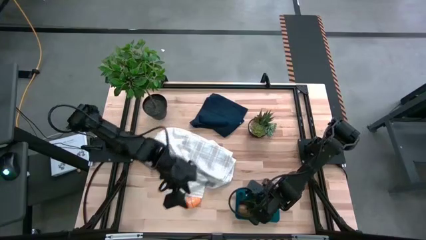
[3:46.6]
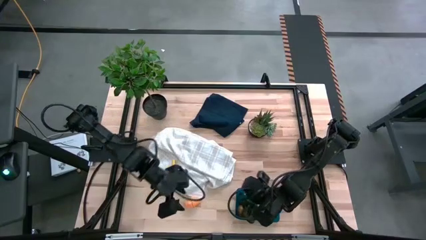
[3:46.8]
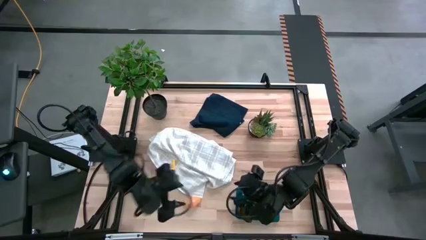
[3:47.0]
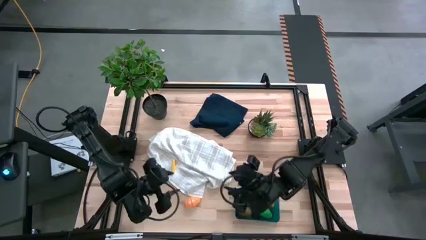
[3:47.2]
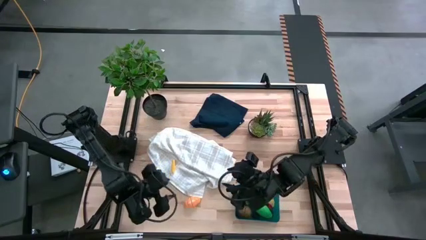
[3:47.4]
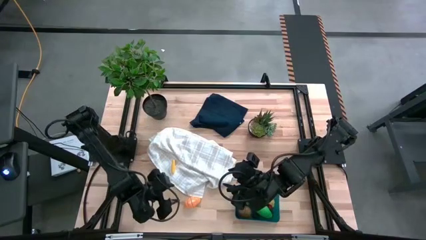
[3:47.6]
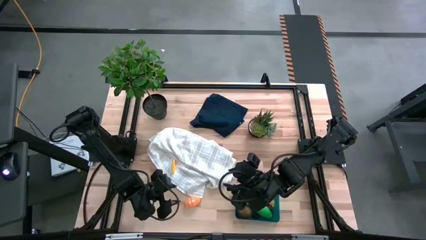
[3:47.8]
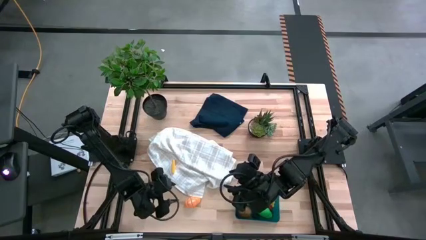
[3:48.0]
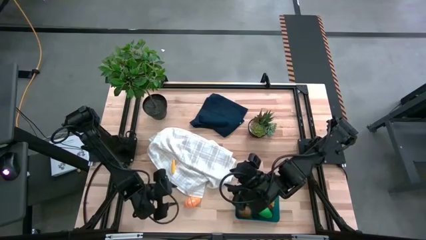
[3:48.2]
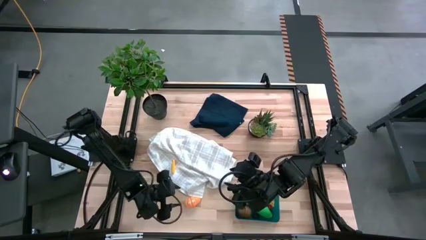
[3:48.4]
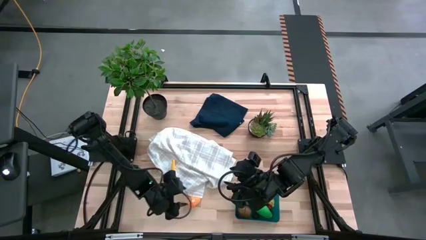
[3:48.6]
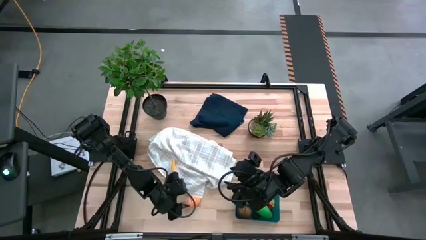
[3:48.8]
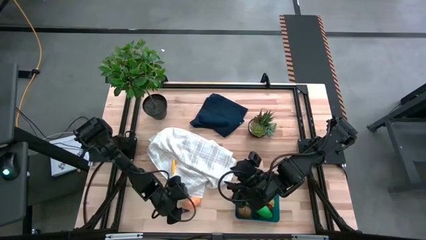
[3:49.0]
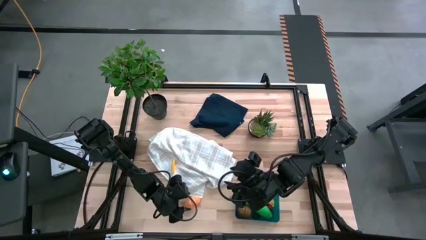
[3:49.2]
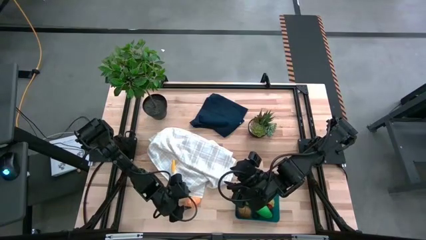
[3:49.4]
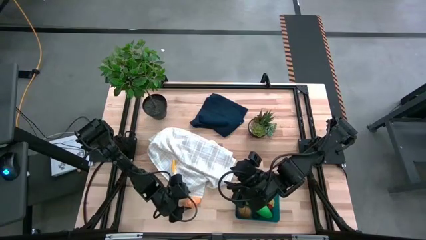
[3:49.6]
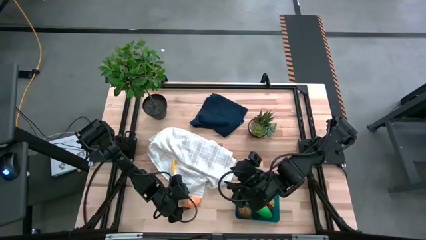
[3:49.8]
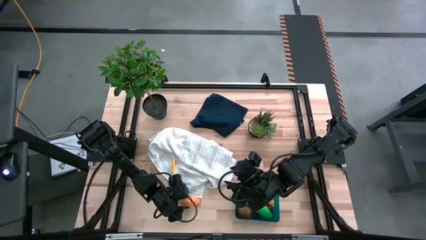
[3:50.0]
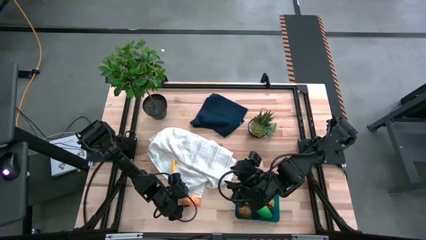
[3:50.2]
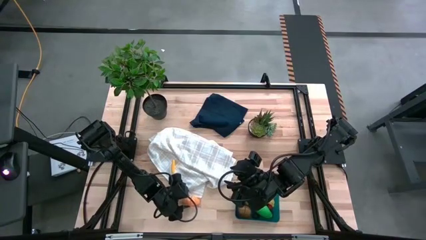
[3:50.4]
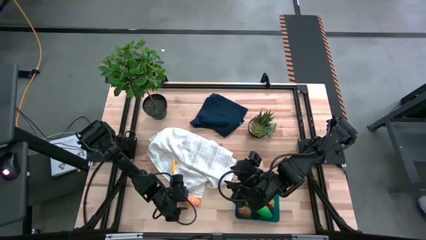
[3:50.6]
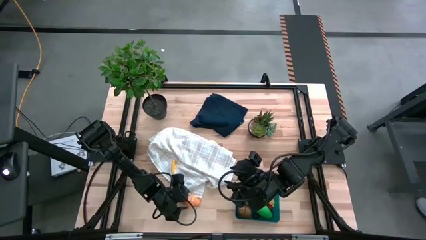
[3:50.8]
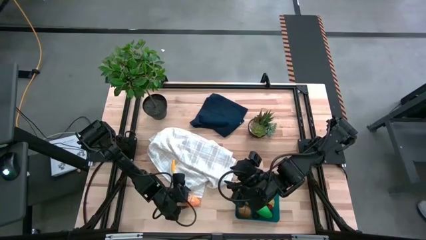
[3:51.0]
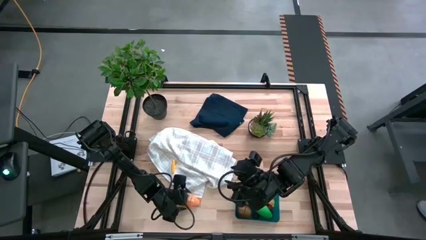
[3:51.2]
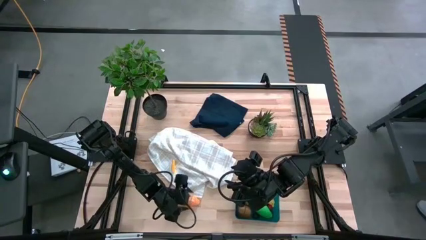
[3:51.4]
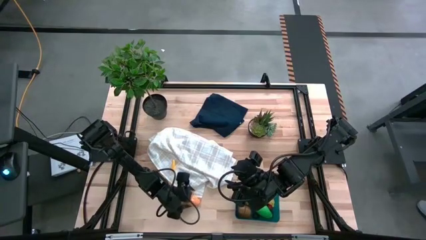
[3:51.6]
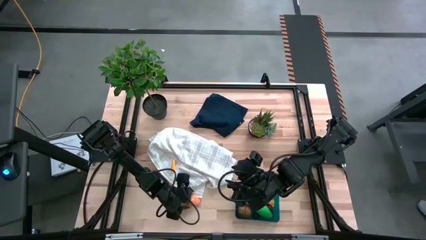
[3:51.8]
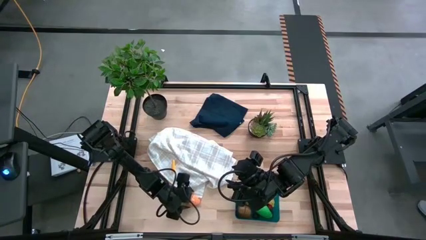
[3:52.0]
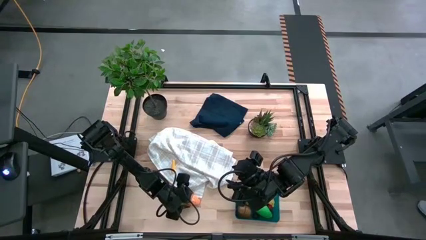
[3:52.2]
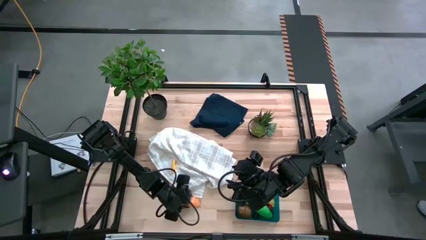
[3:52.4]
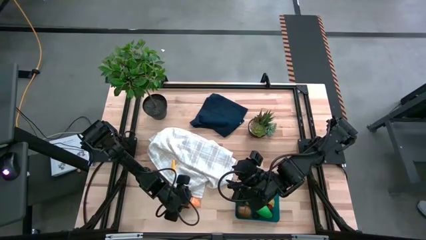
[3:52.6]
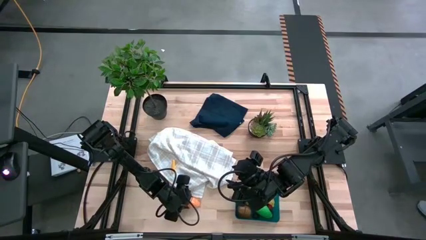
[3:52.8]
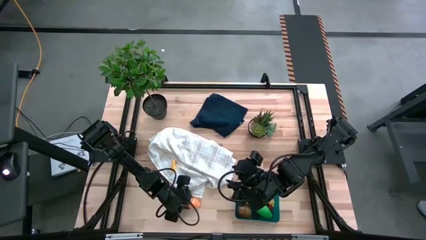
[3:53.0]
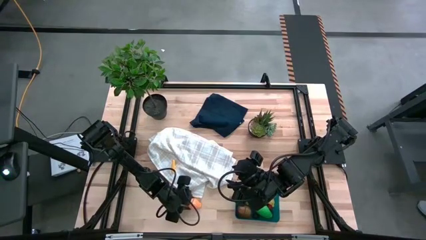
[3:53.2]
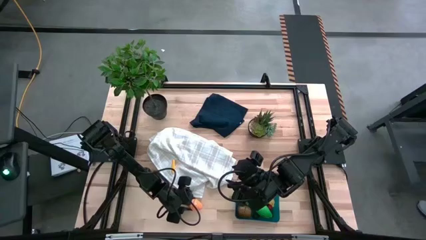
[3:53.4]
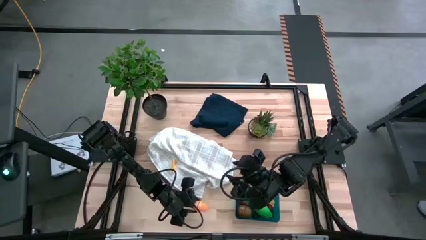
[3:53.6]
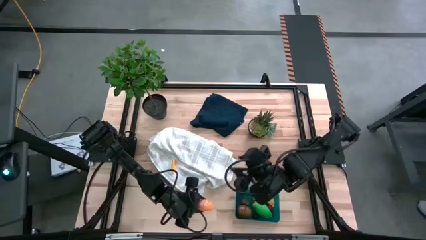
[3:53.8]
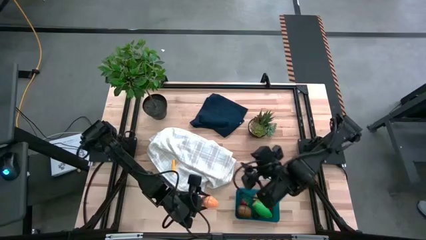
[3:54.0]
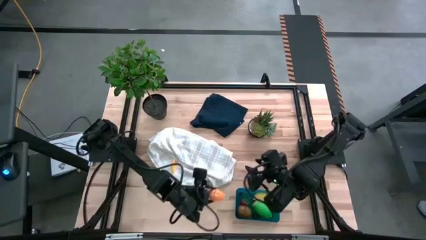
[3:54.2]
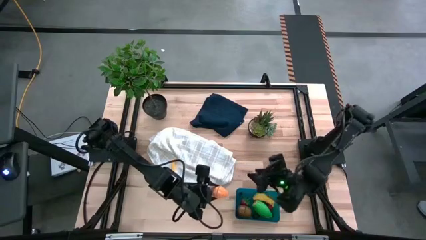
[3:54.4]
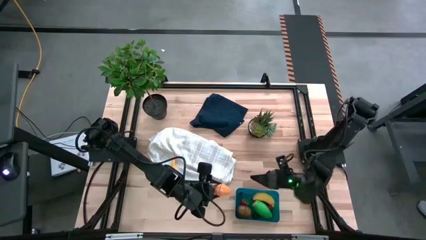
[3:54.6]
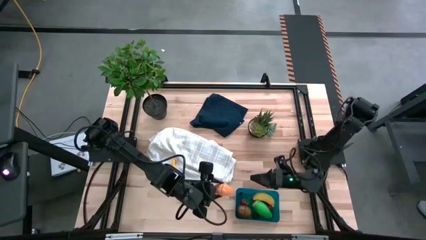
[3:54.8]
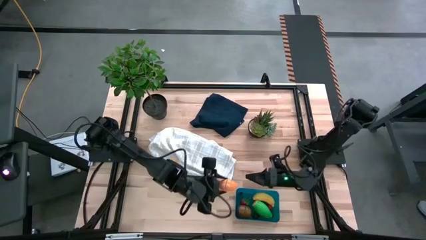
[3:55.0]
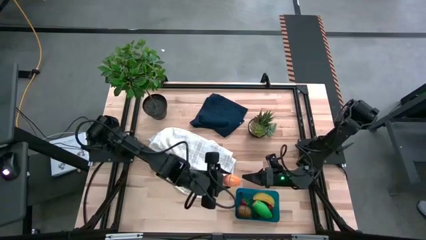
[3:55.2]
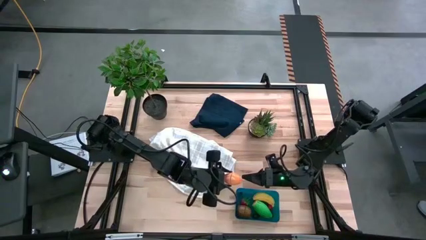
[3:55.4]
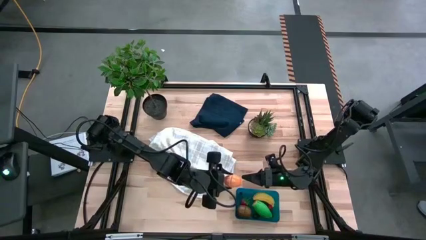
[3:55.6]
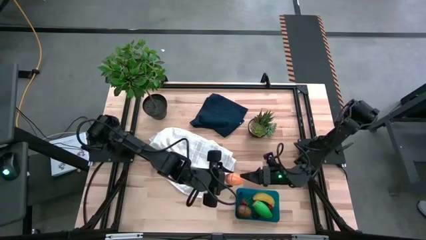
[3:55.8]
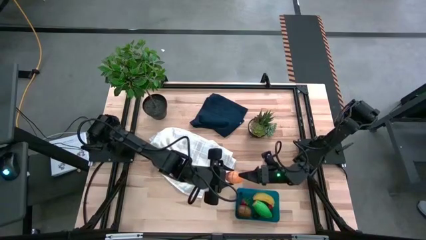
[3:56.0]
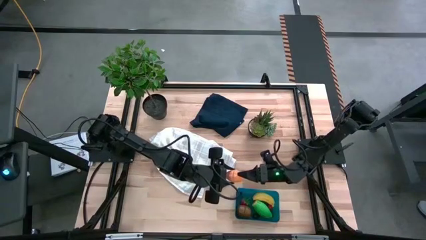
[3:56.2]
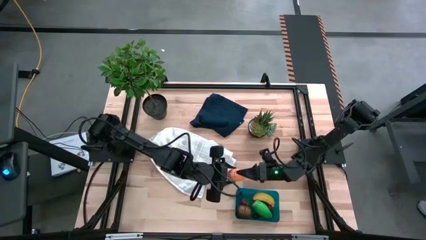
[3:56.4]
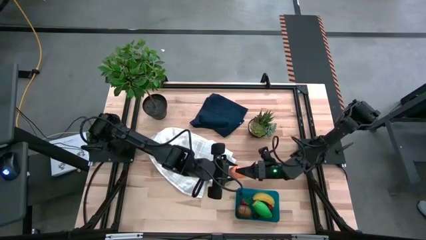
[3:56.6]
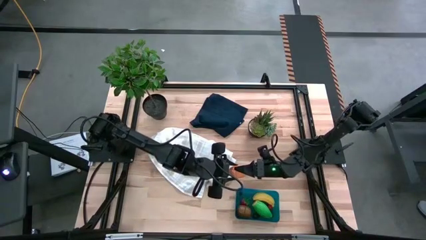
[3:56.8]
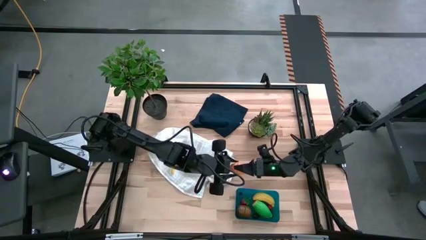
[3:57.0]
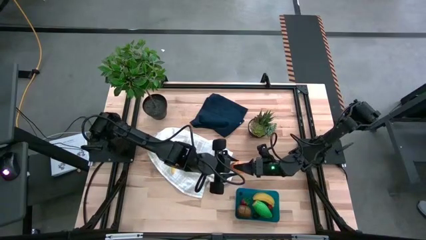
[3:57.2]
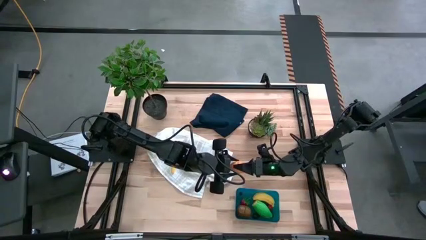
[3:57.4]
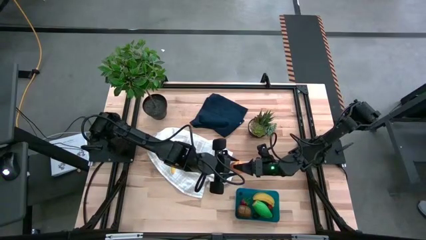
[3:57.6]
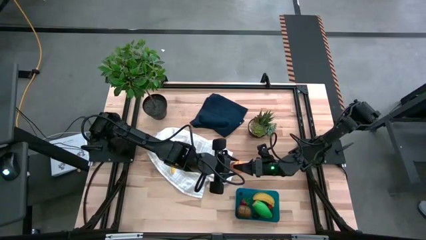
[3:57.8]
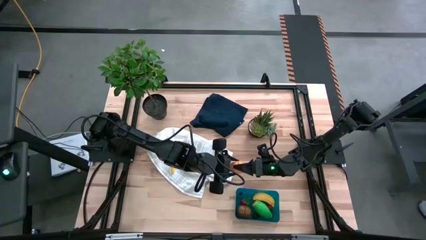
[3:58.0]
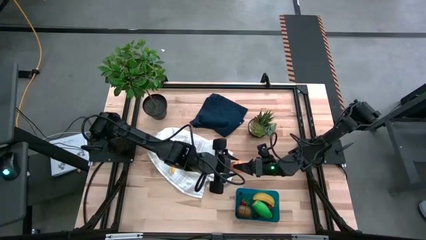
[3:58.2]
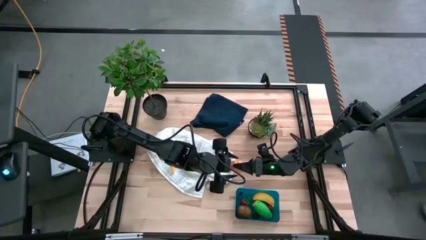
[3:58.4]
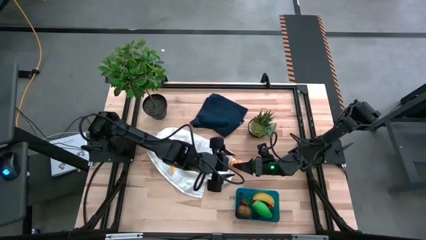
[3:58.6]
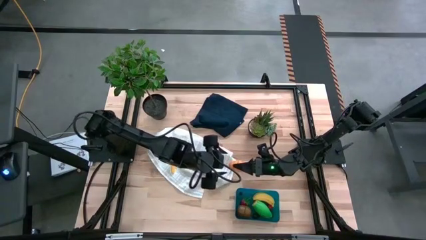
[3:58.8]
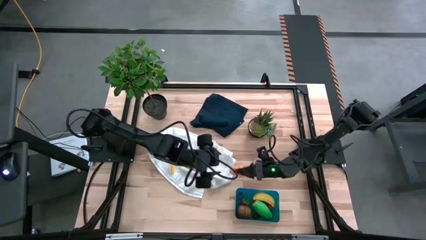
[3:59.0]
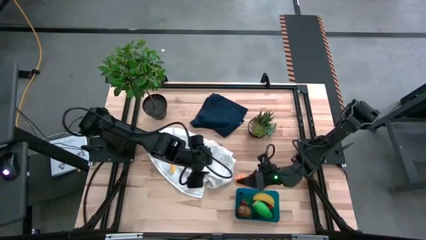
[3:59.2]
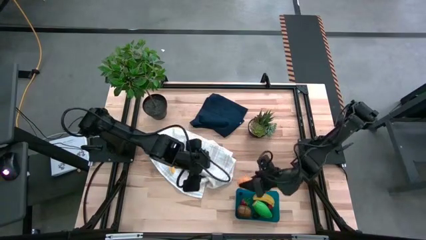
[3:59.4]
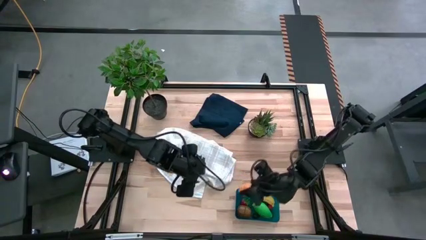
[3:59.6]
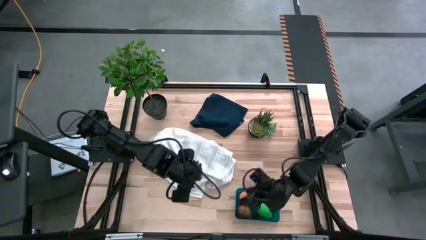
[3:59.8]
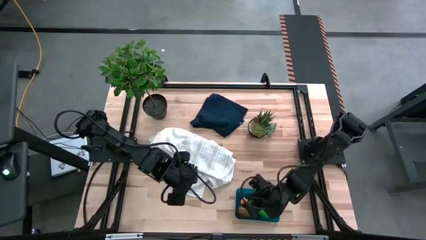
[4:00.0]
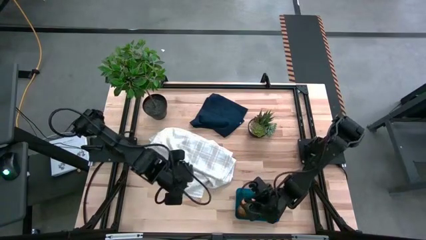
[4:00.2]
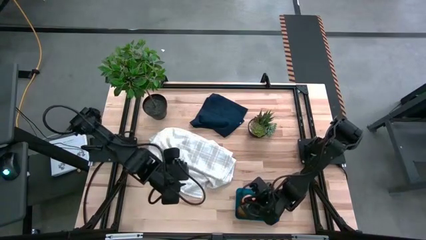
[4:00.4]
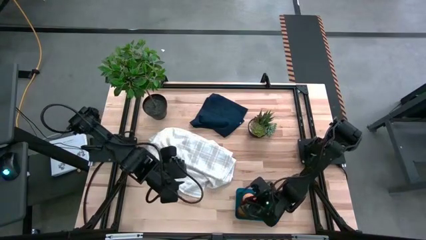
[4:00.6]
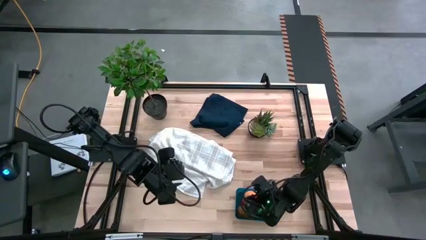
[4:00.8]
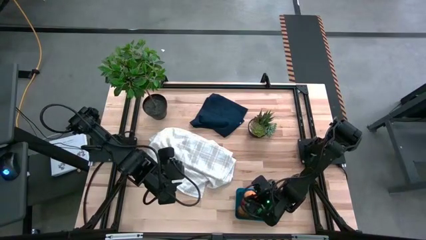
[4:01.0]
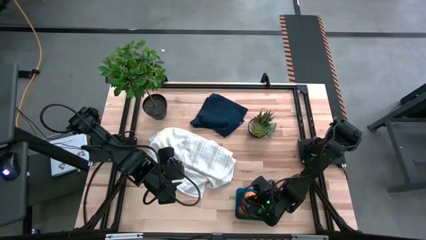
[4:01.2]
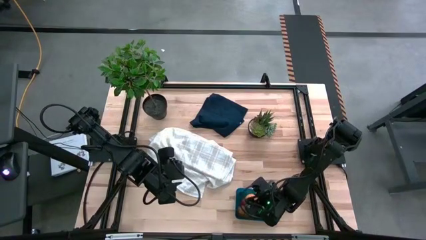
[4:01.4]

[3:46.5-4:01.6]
Task: Pick and placing Produce into tupperware
Put the croissant into the bin

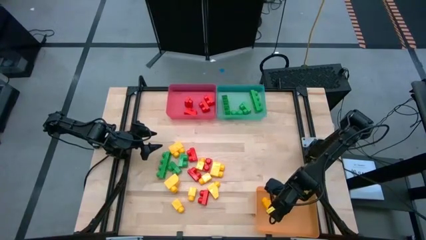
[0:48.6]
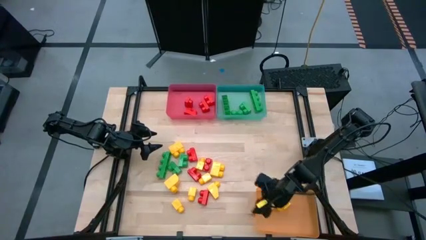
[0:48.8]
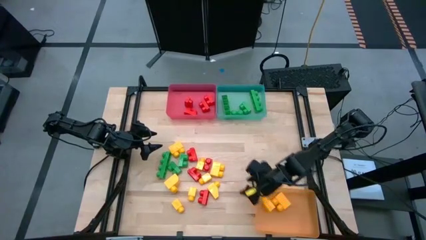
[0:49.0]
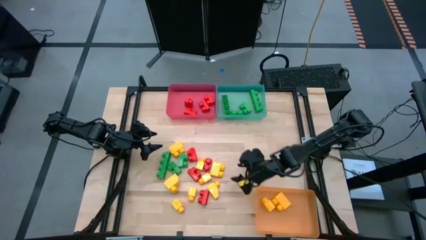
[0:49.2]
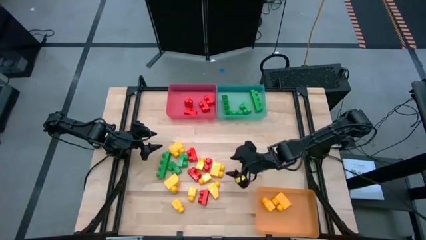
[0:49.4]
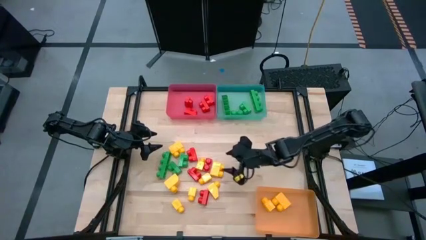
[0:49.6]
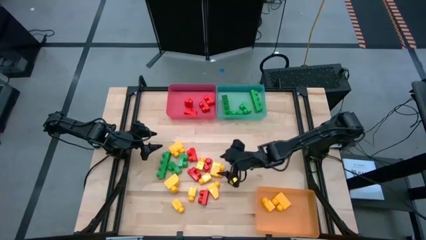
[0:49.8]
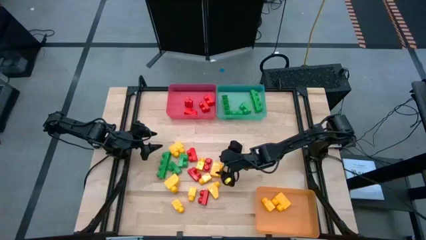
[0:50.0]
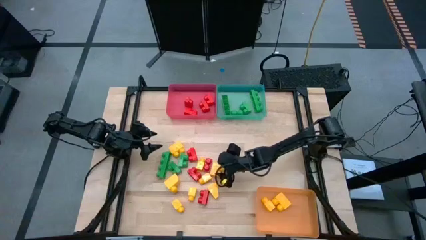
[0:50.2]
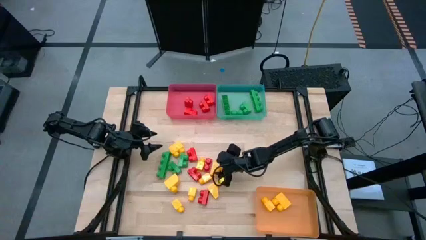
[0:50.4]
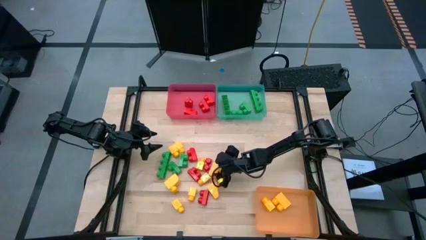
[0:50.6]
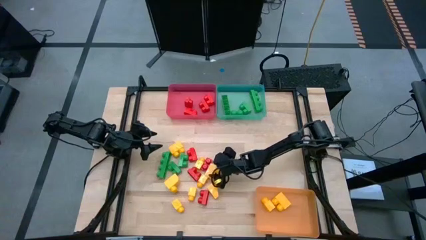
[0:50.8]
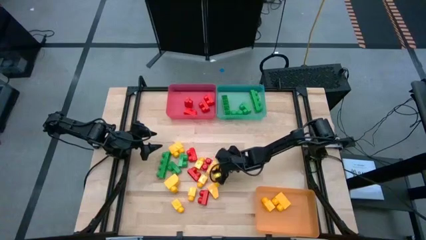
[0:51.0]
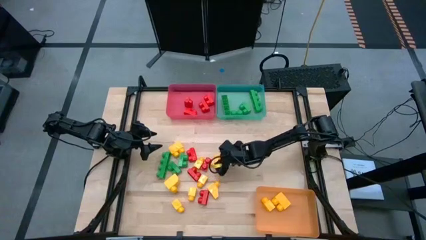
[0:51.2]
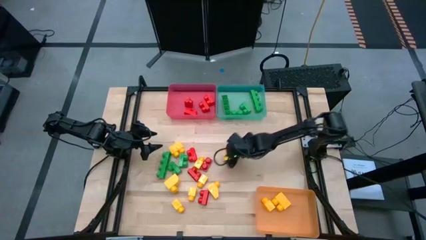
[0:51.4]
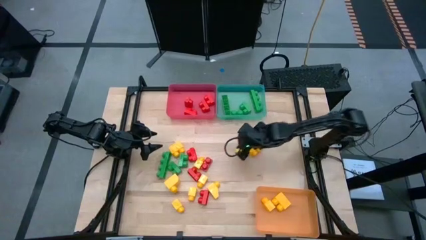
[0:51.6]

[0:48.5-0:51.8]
Task: Sort blocks
Move the top right yellow game piece to the right
